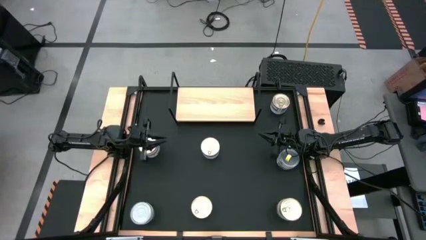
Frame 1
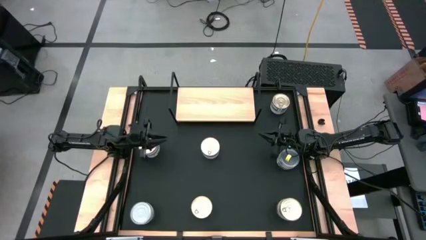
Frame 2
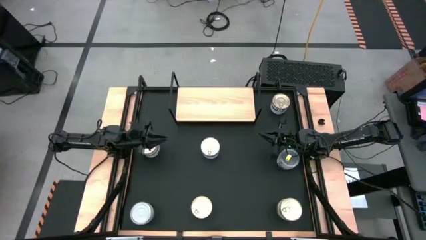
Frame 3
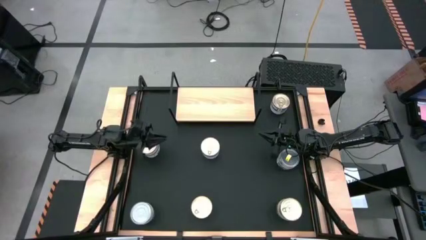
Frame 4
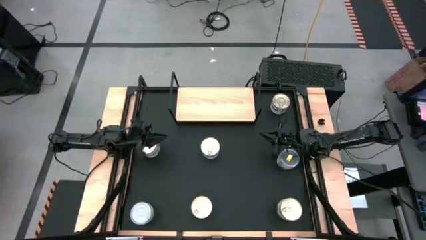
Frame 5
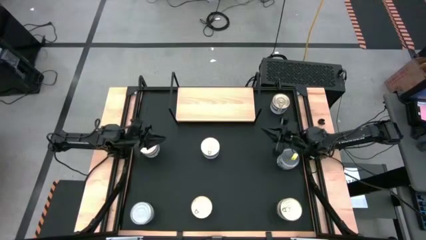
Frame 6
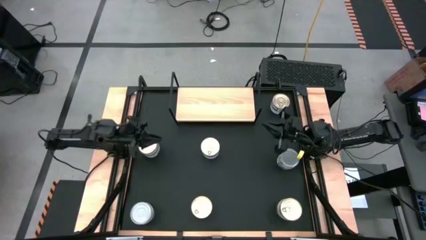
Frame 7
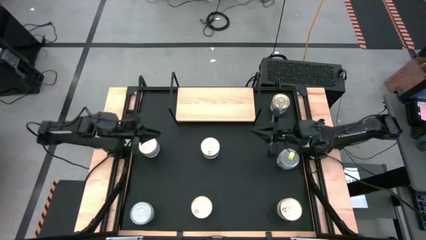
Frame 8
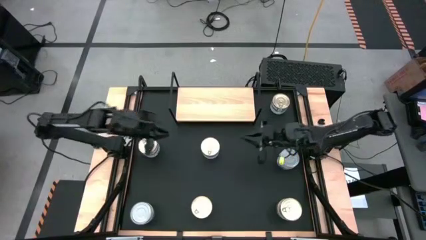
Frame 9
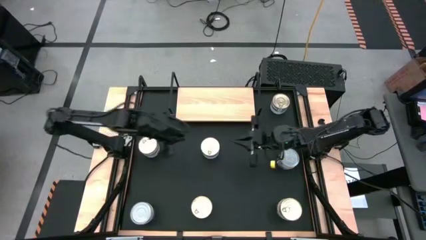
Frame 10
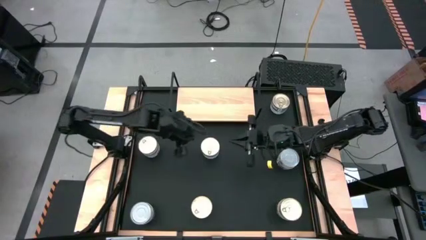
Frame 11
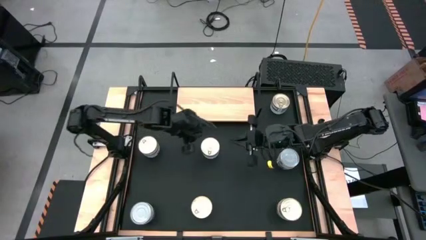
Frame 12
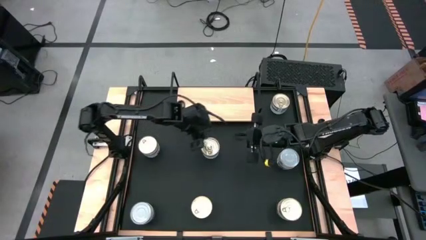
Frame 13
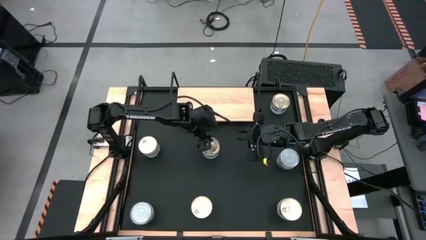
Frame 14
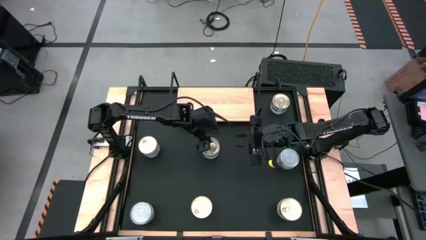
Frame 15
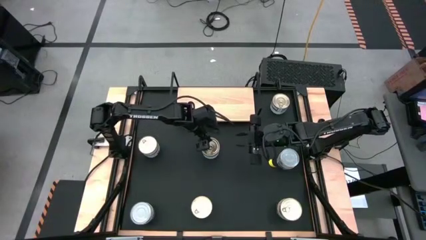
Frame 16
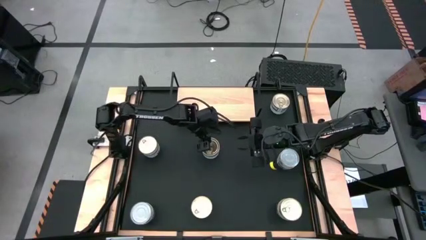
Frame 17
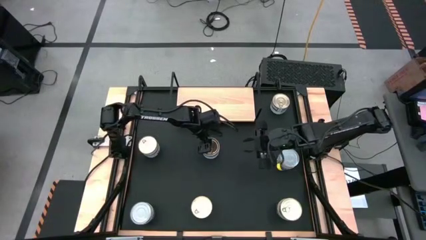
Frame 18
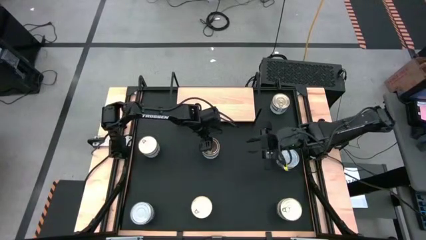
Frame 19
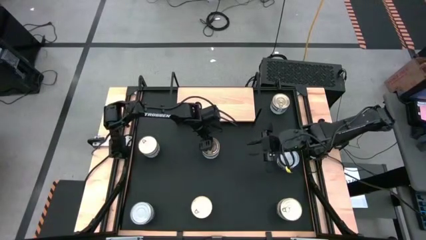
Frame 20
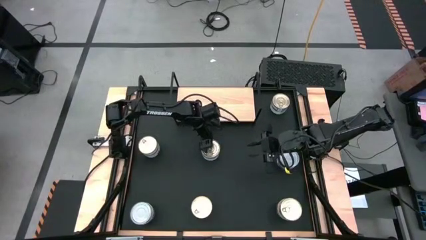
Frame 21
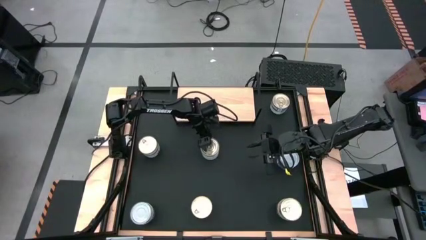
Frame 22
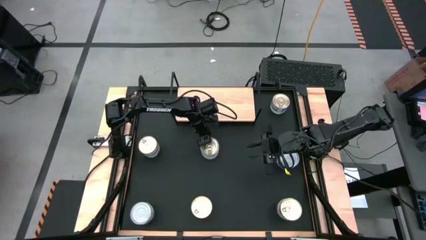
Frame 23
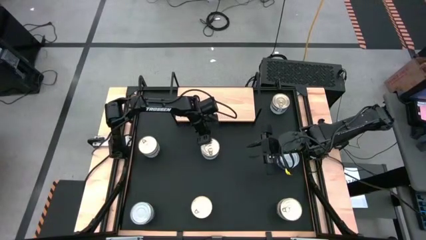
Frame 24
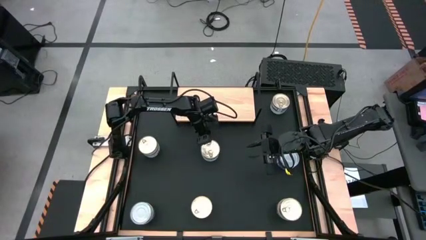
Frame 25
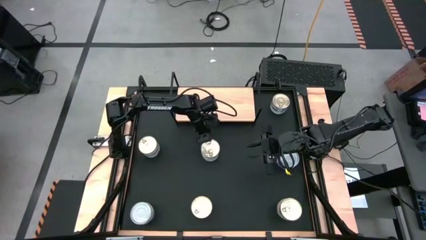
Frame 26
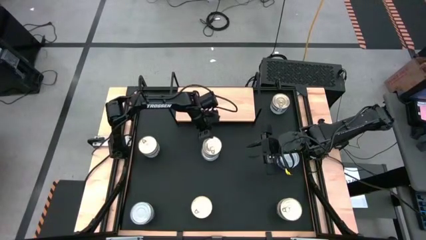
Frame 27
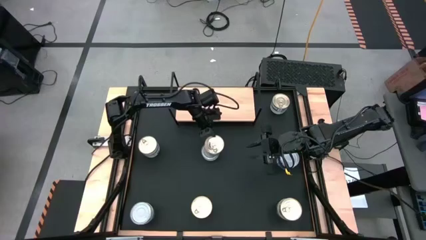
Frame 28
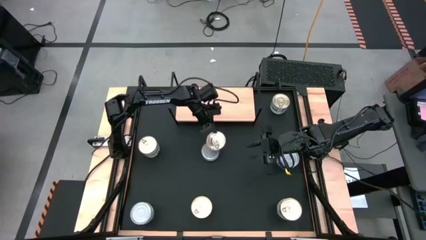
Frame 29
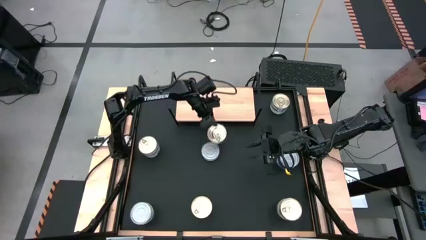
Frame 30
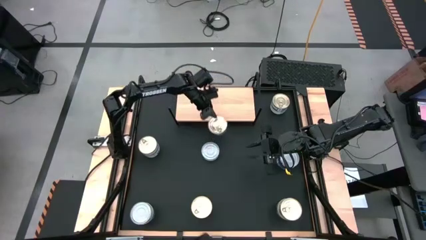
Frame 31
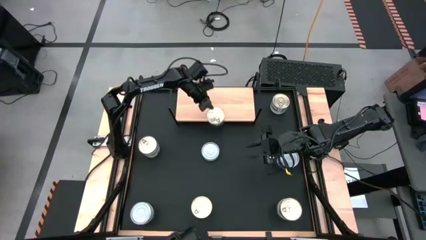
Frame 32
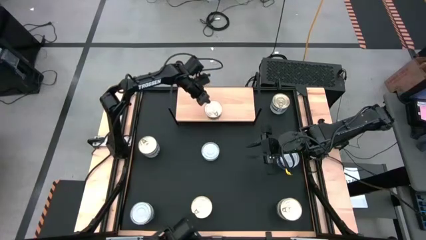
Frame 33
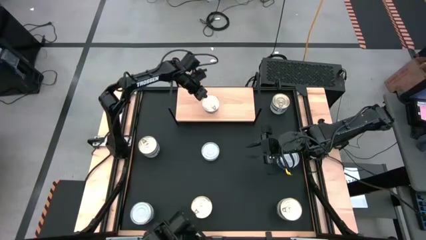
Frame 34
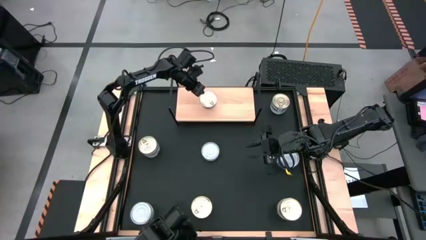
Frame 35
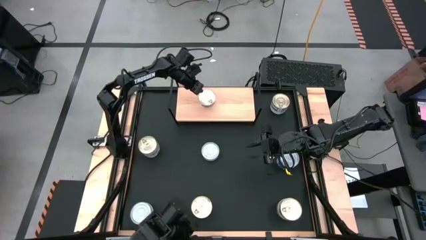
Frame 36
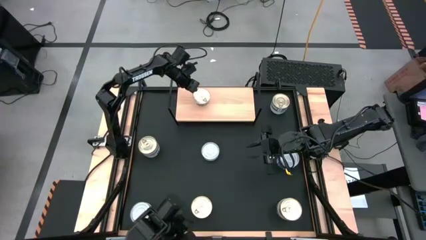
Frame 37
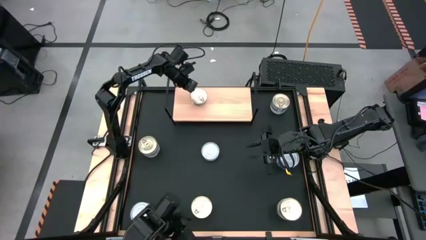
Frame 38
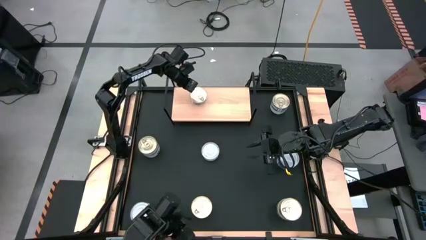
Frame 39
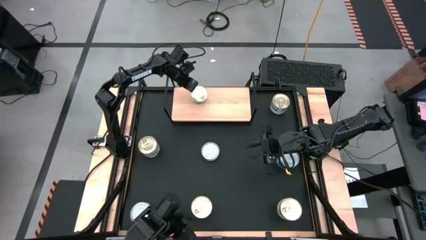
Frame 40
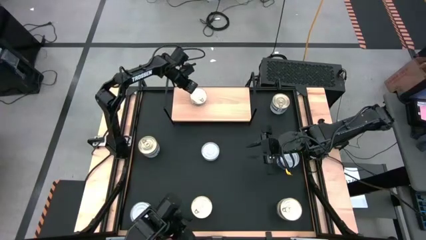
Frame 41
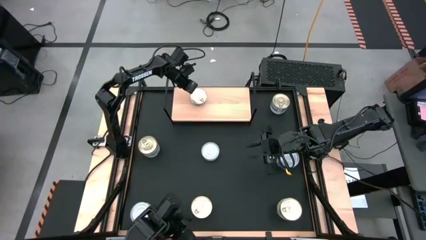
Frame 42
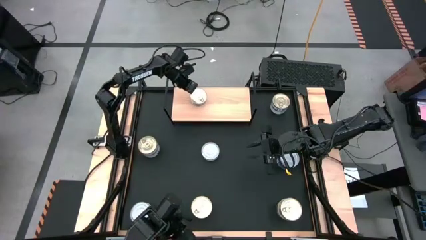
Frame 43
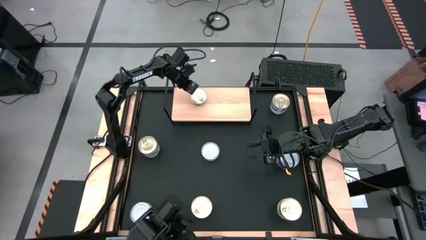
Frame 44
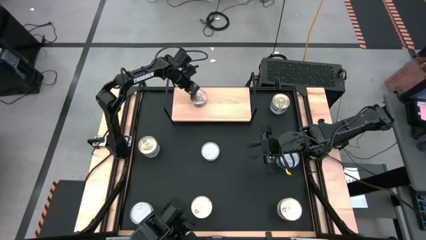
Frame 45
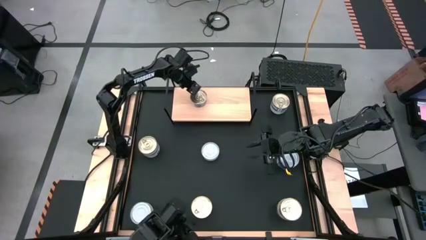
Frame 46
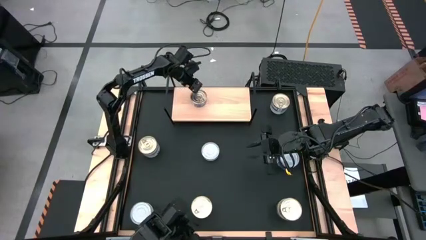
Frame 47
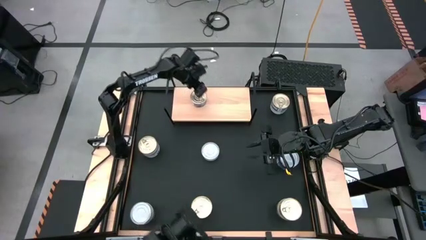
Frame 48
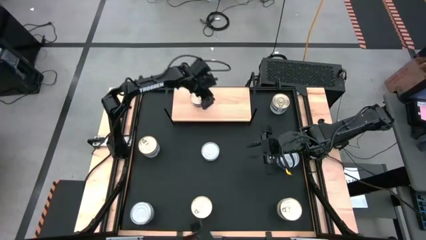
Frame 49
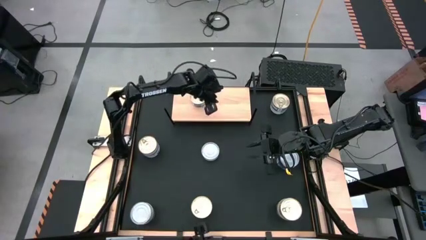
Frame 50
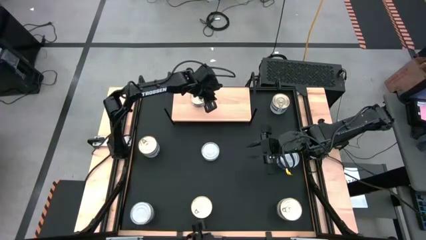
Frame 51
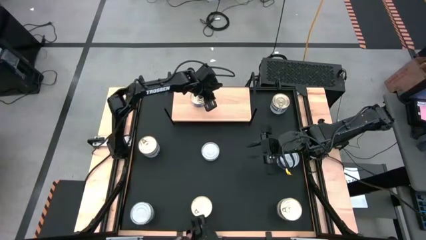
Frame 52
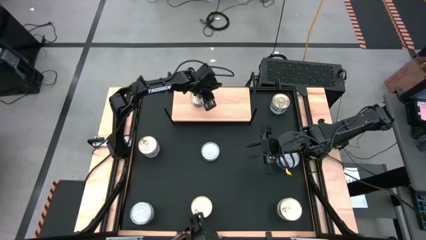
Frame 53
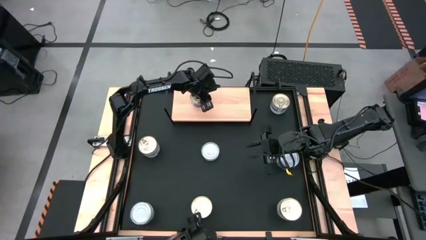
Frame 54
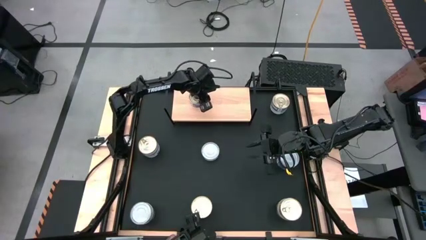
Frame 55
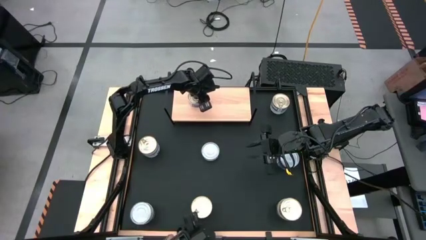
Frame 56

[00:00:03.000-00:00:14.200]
Task: Stack canned seafood by type on shelf
Put the blue tuna can on the shelf

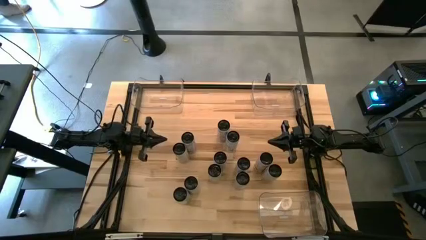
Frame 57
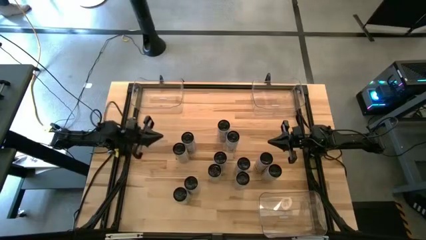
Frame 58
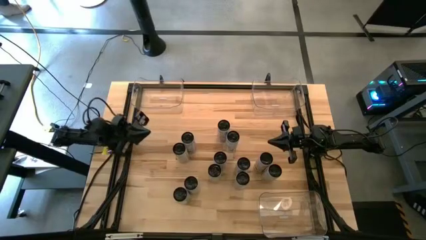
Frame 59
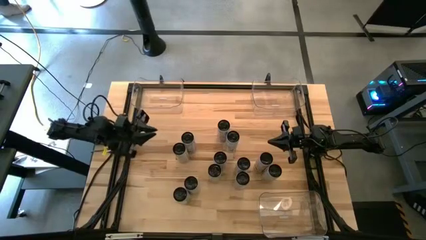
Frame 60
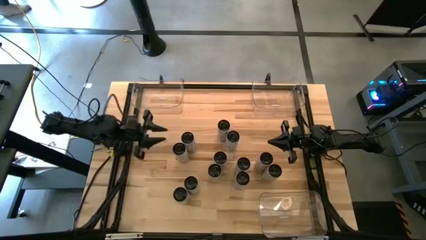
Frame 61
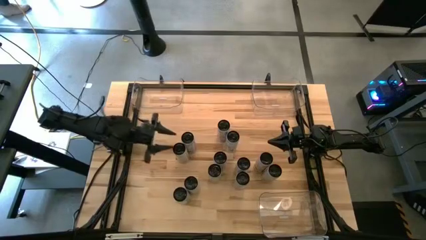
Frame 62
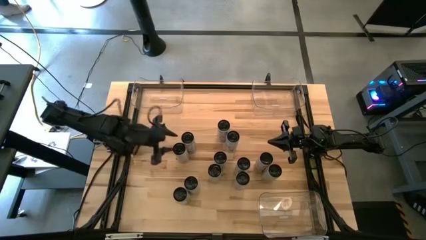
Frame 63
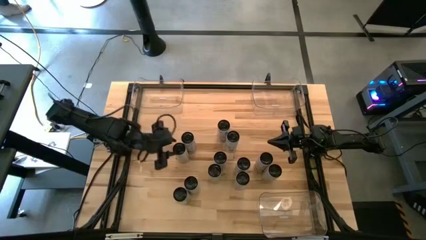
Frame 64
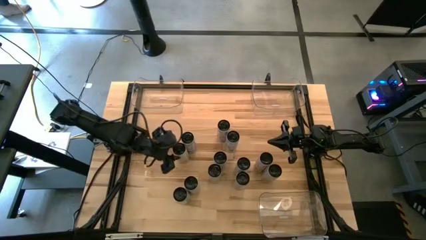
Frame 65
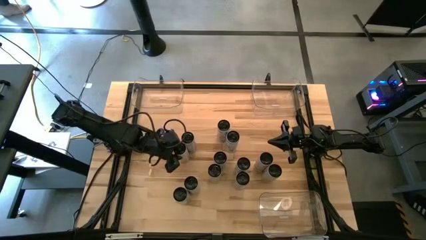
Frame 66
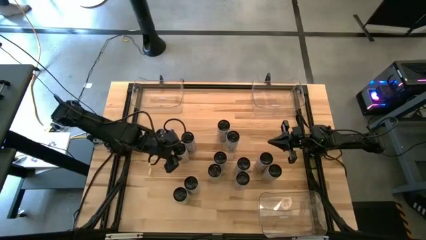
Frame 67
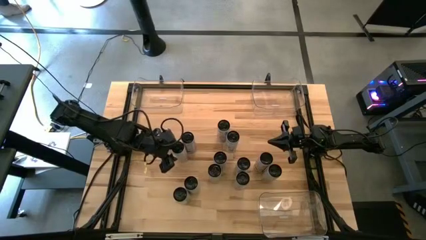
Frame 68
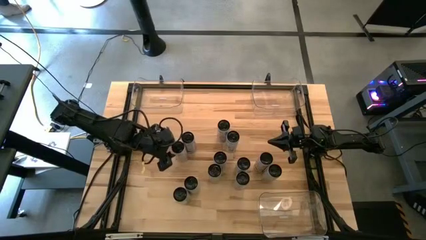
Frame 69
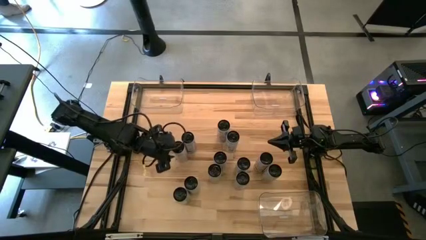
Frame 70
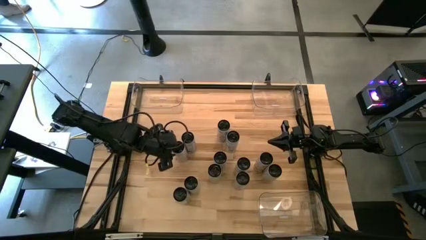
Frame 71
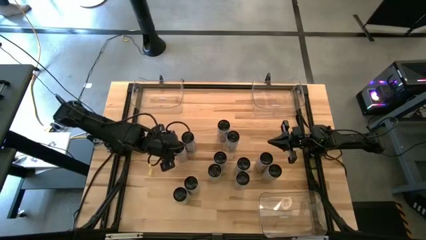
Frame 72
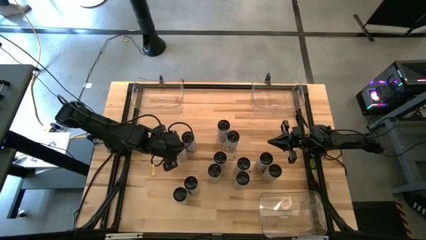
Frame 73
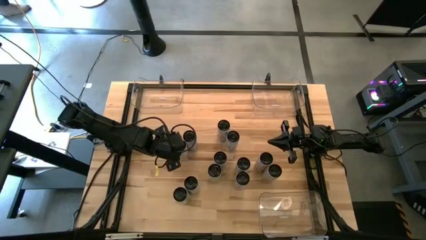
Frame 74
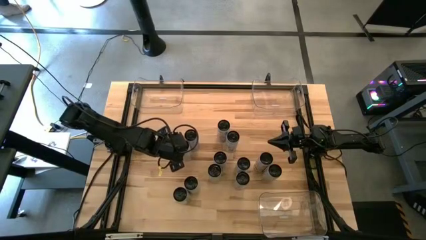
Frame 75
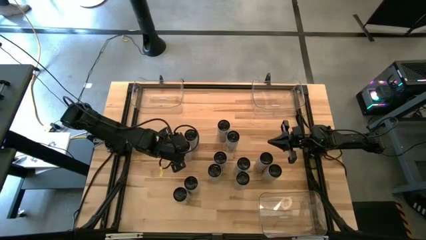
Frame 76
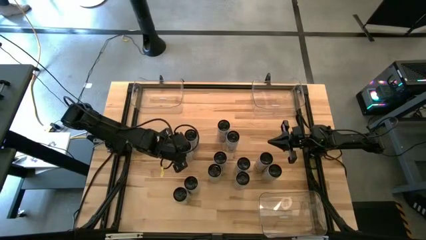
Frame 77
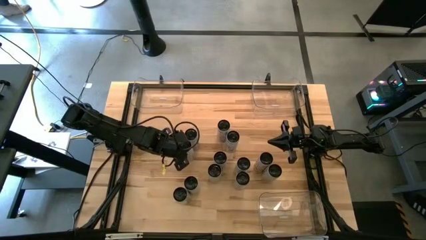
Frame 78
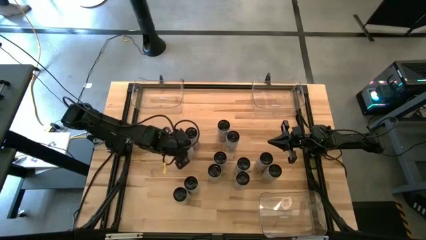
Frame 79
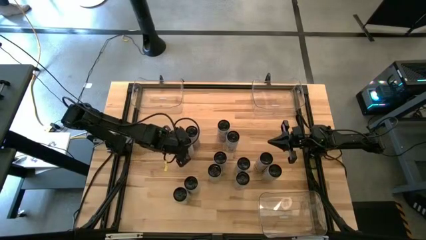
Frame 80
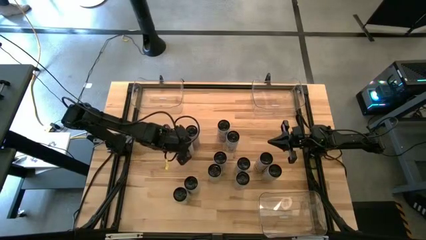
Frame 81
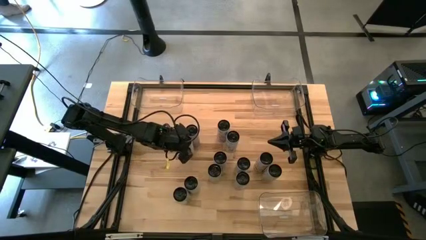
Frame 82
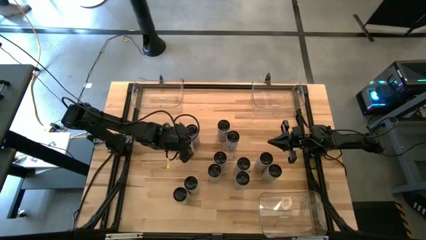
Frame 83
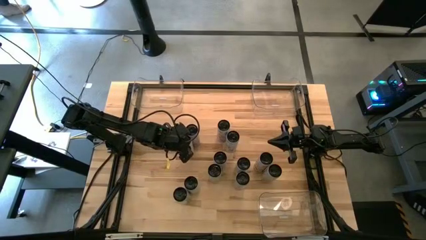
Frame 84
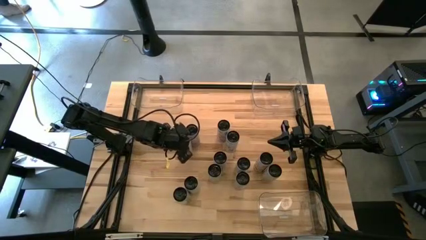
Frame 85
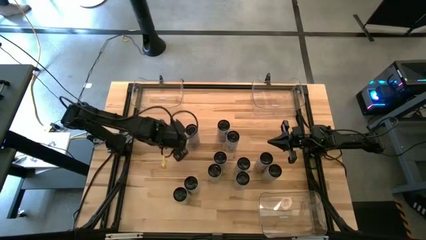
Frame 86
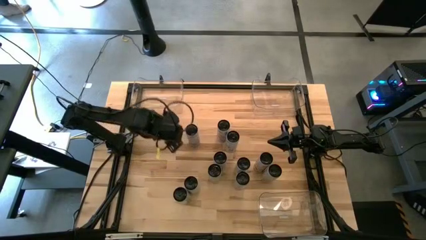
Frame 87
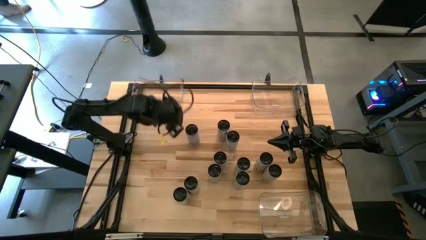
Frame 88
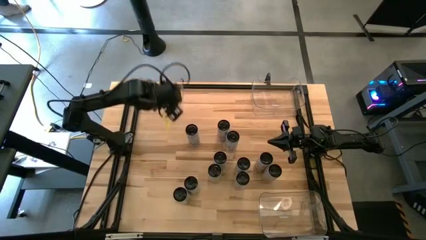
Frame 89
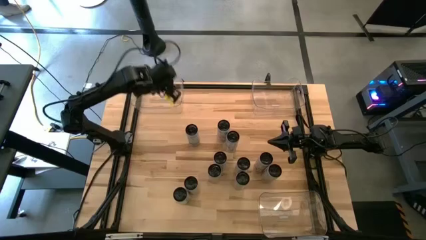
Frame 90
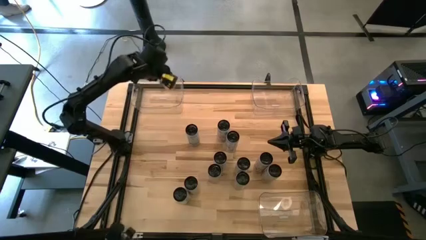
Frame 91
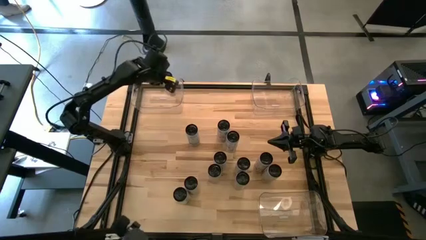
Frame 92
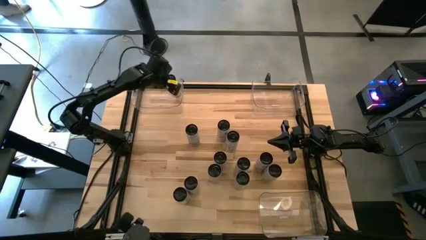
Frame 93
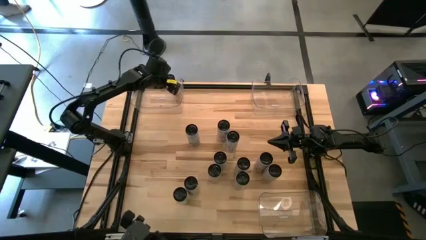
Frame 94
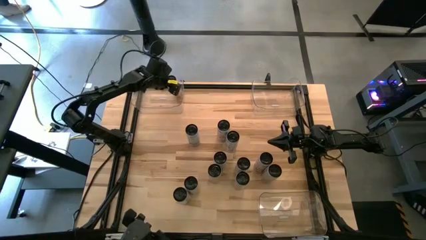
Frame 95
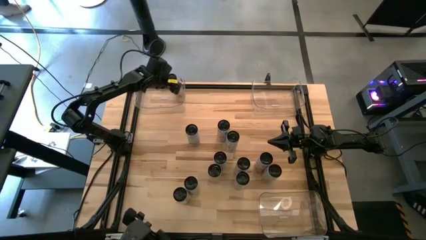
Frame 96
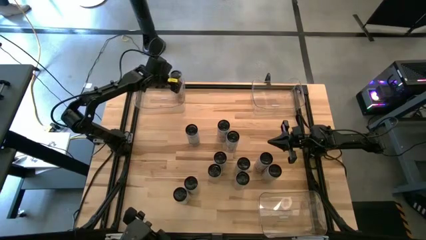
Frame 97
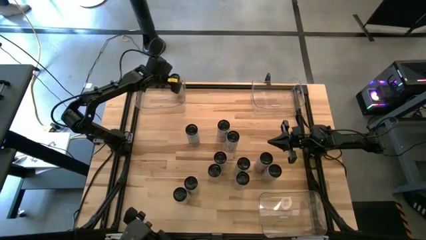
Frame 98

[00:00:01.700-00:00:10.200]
Task: Sort soda cans
Put the white-yellow soda can into the top left transparent bin
